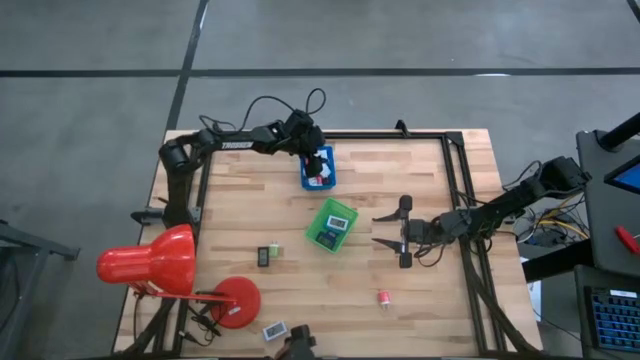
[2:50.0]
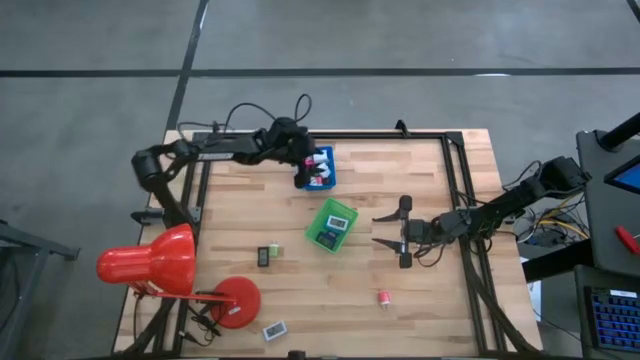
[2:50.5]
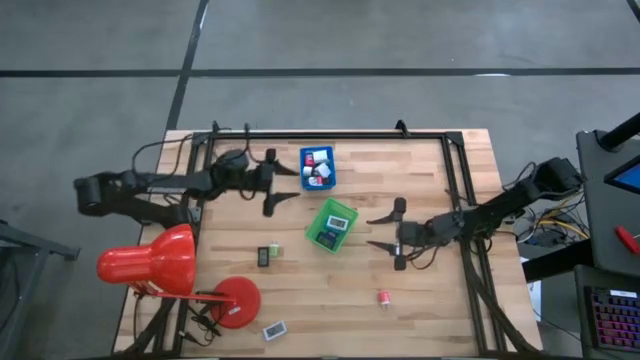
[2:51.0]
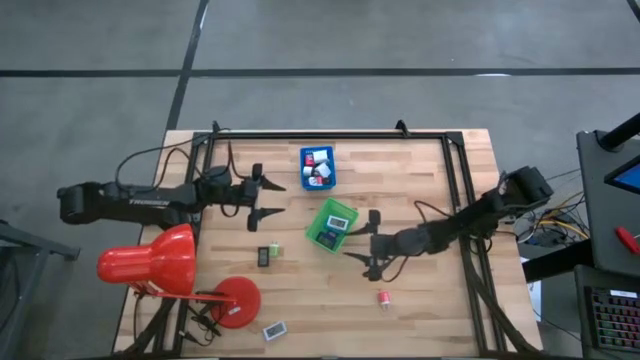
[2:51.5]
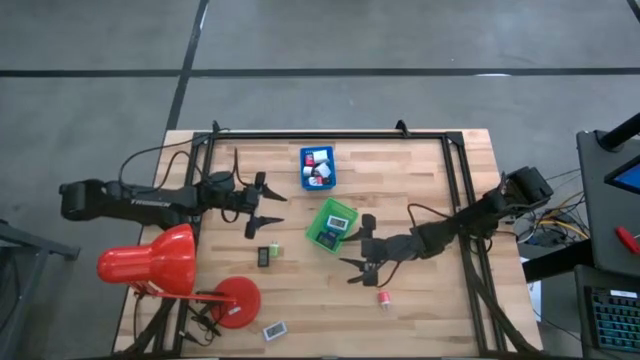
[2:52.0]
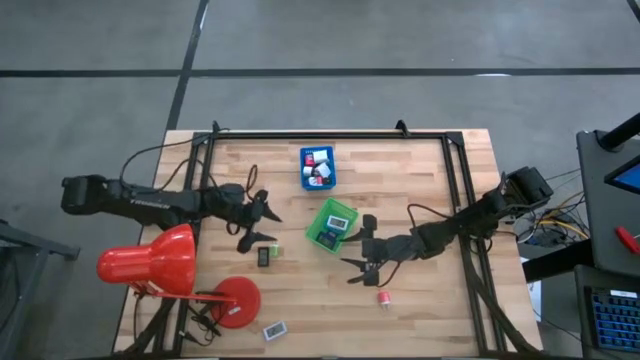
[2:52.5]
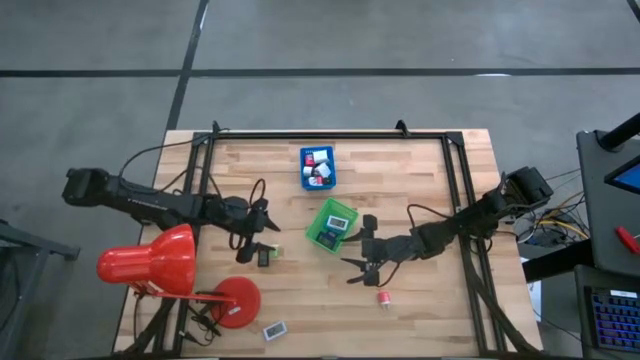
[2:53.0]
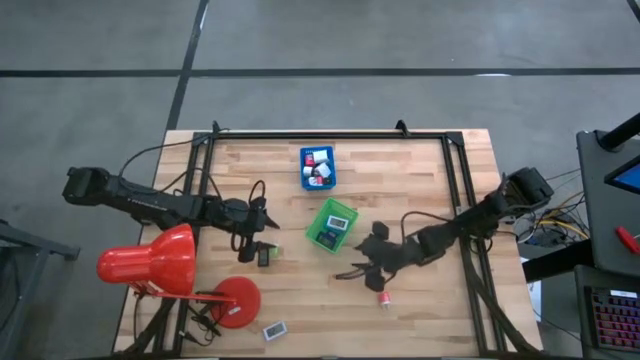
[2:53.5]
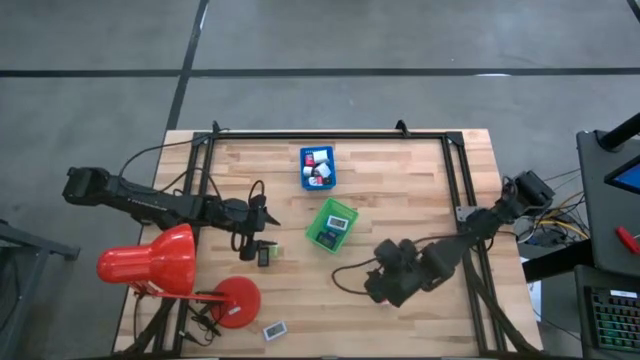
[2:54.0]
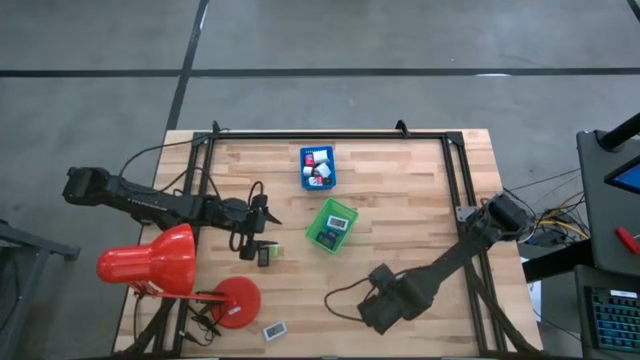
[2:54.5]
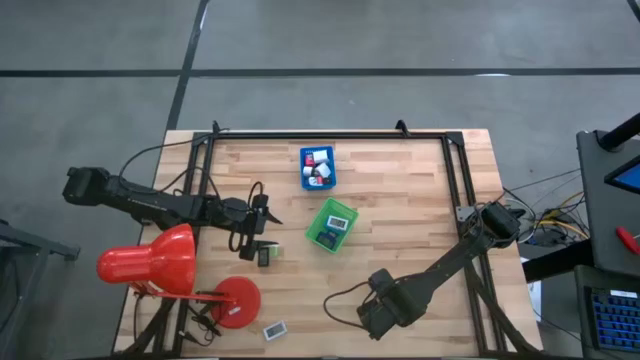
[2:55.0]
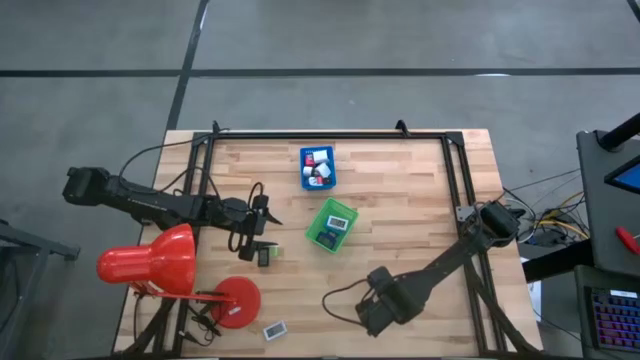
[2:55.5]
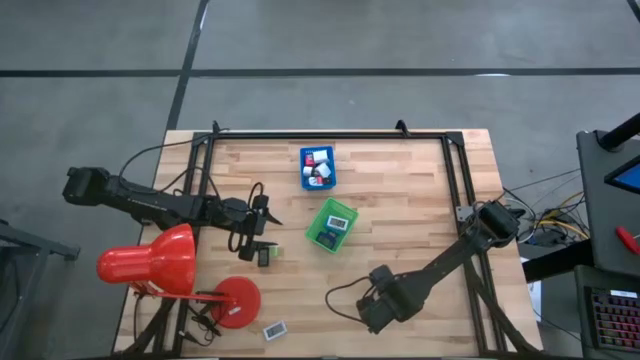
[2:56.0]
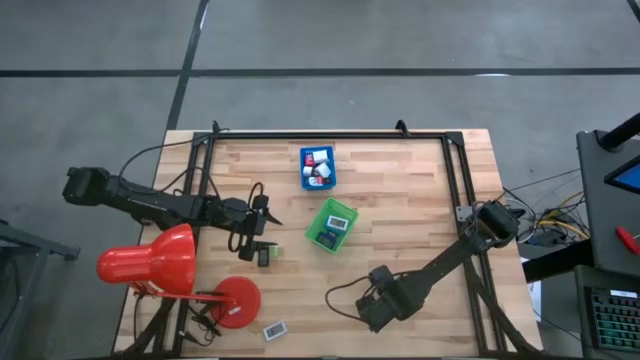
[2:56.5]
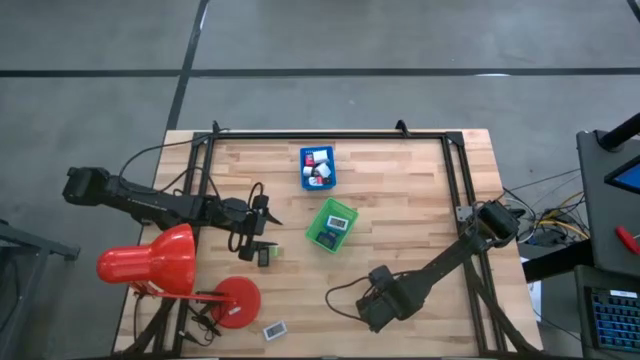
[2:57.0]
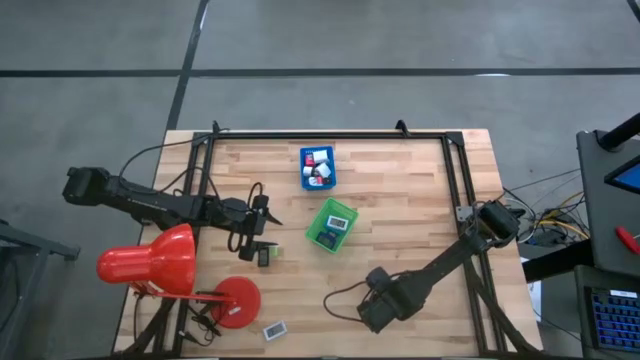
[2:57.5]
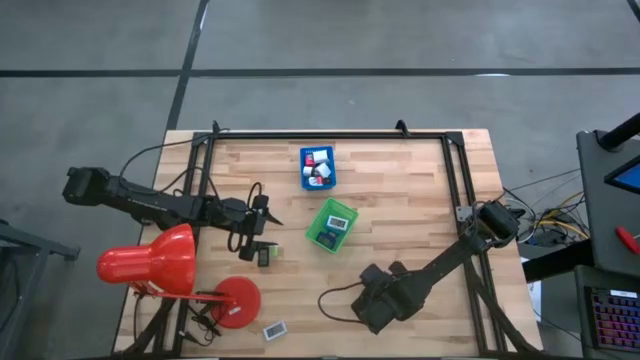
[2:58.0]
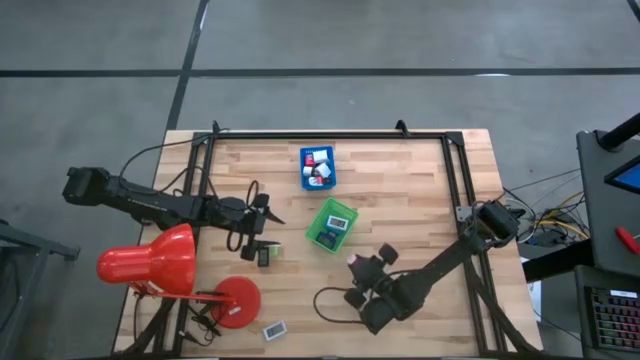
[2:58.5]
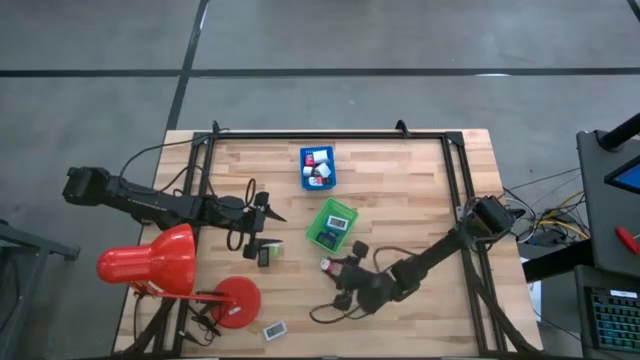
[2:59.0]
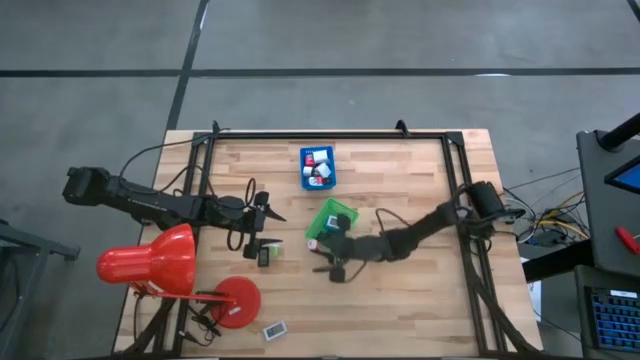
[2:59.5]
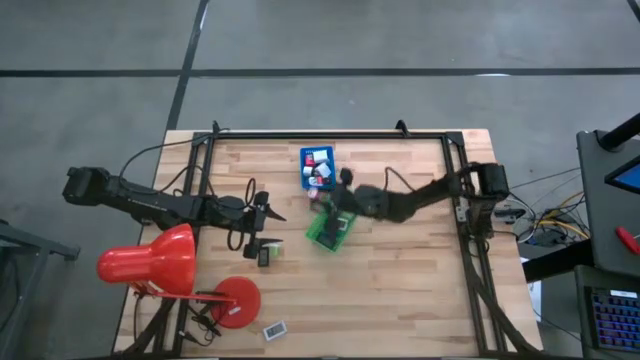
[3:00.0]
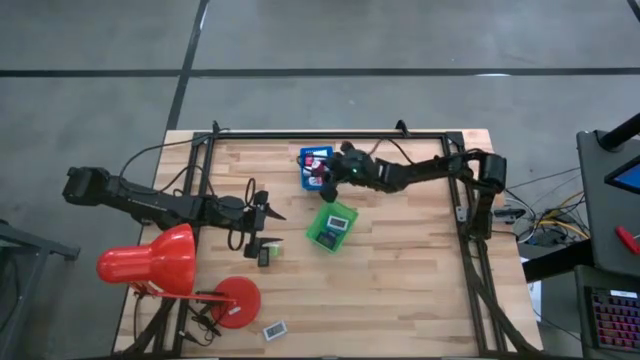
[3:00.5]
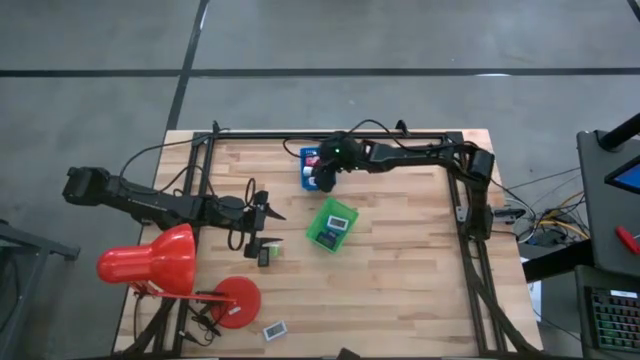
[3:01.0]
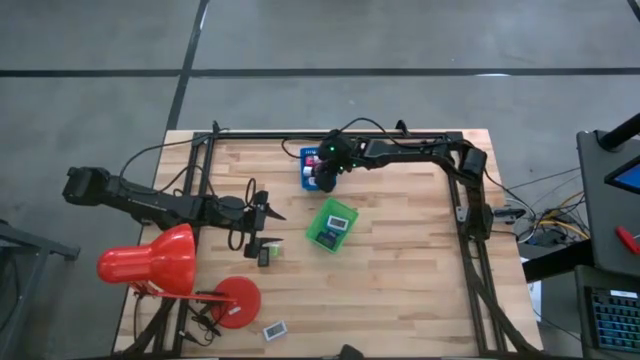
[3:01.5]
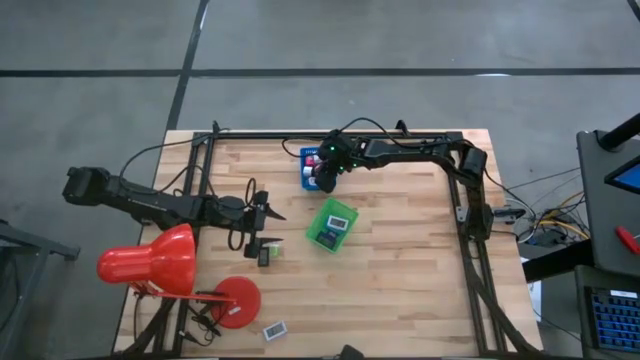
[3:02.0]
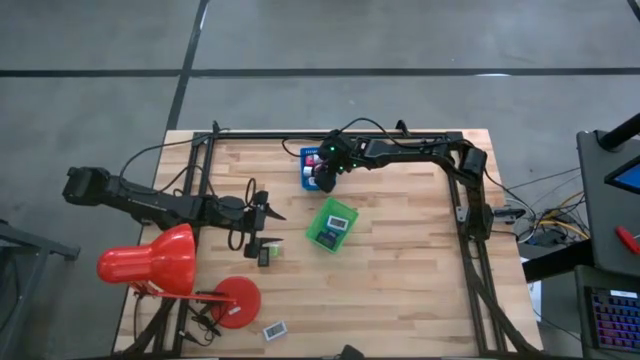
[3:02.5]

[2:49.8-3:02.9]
Task: Pick & Place Office items
Put the small red charger adapter into the blue bin

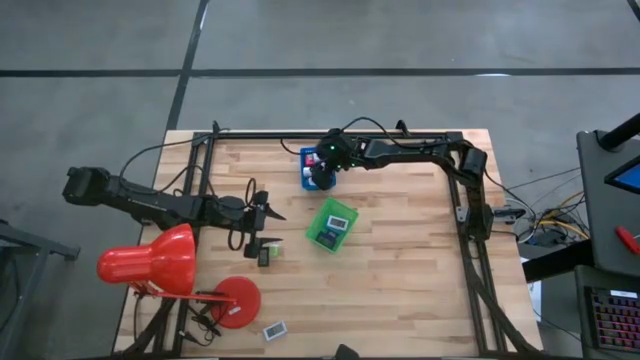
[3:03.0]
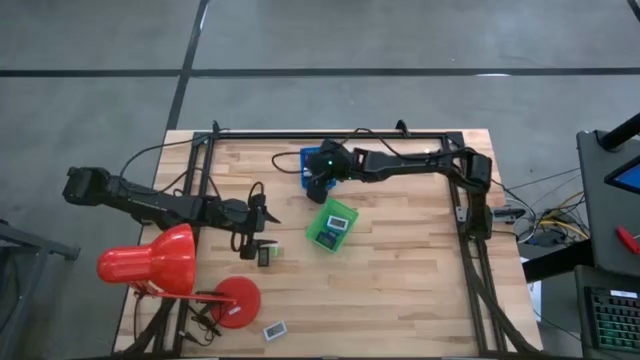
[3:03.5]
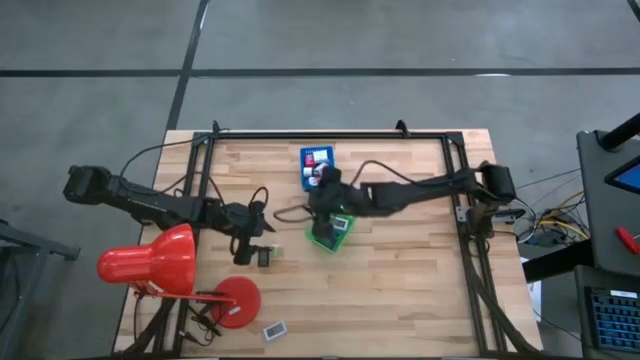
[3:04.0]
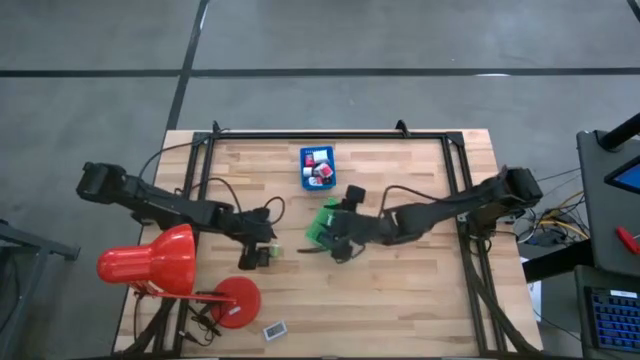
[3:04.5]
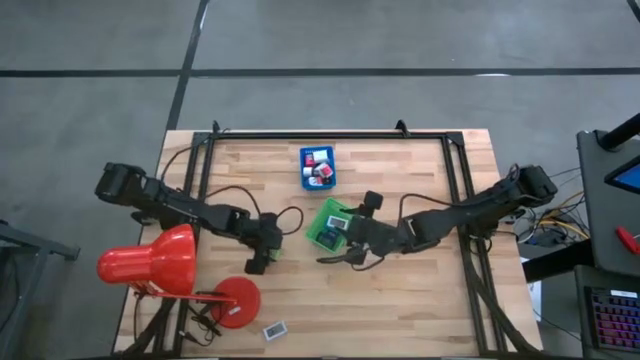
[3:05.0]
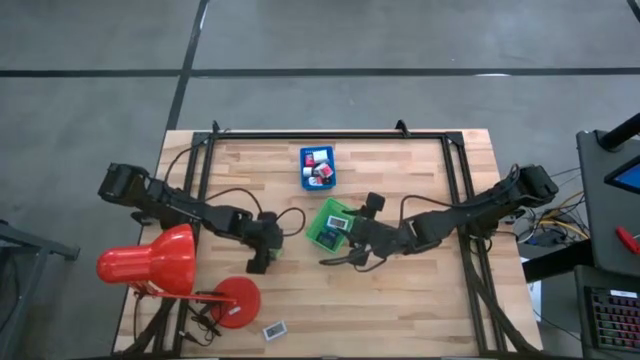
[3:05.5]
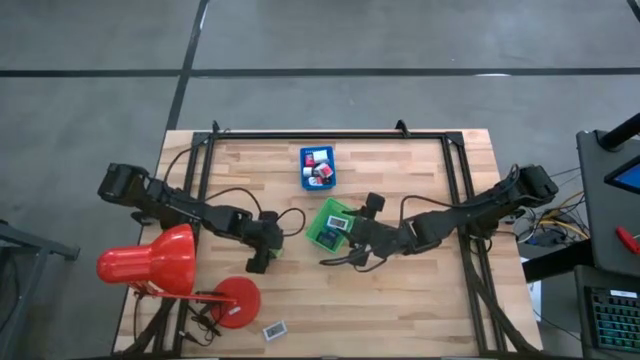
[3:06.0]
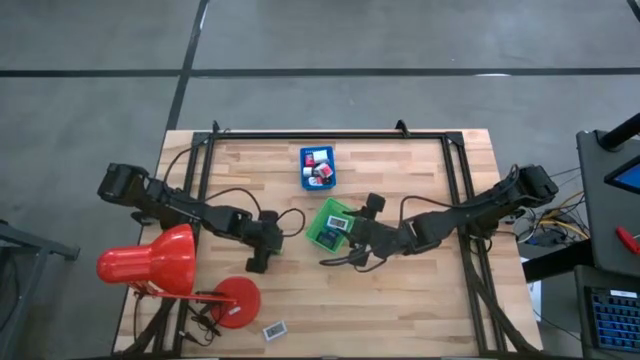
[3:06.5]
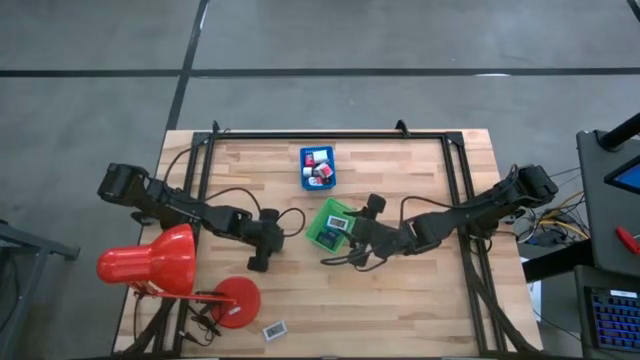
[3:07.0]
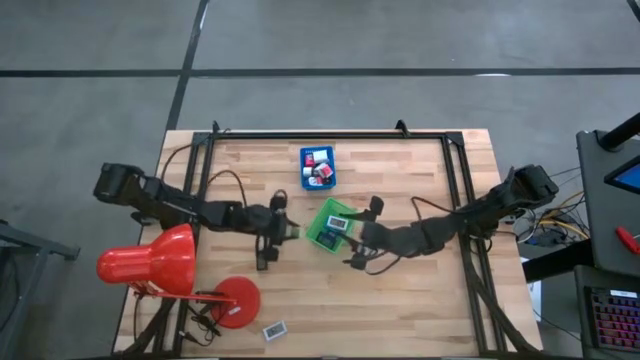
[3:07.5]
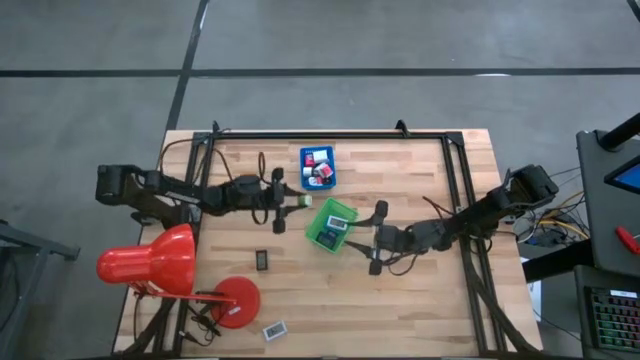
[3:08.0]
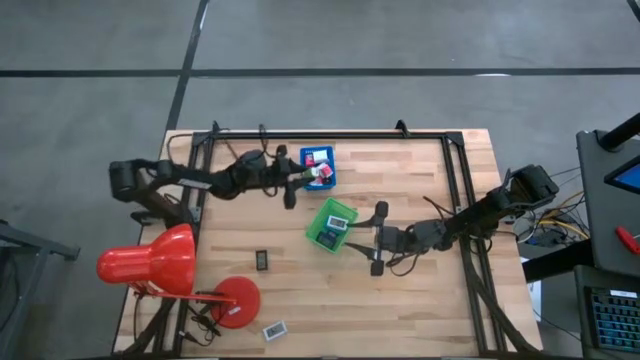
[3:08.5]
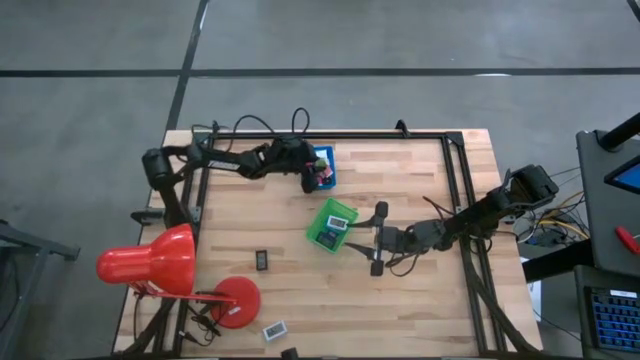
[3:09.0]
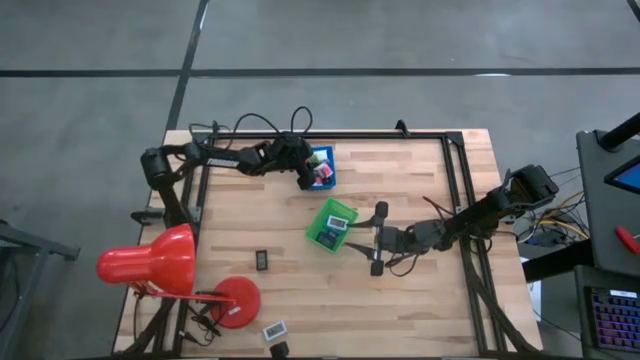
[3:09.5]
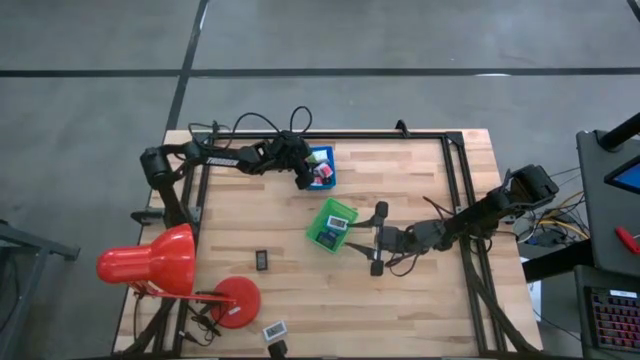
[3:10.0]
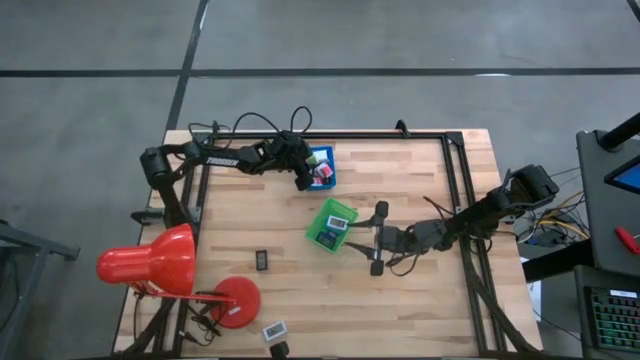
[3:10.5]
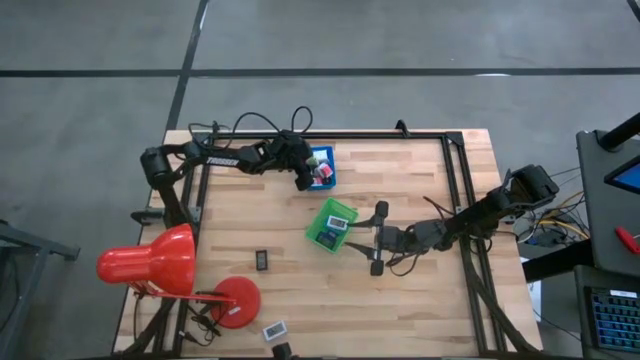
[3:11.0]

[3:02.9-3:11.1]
Put the small green charger adapter into the blue bin
